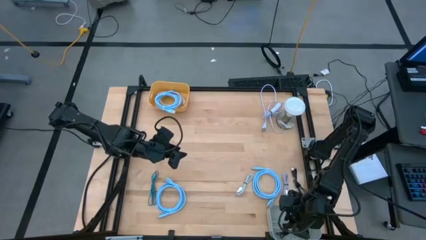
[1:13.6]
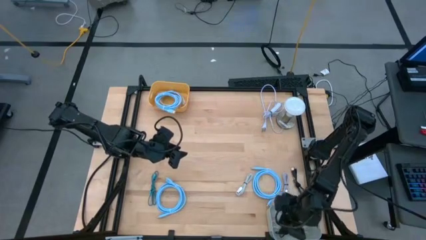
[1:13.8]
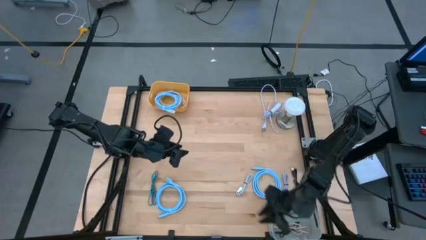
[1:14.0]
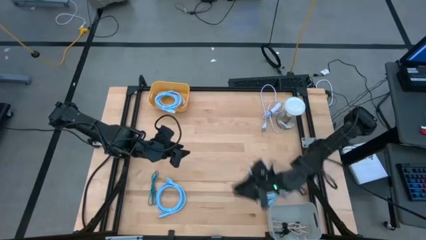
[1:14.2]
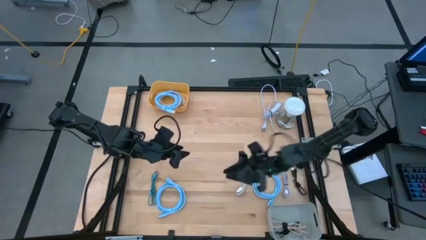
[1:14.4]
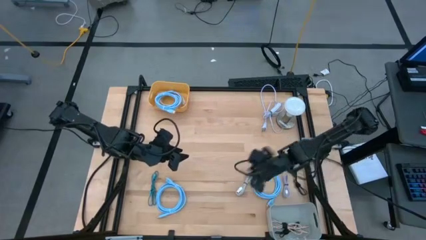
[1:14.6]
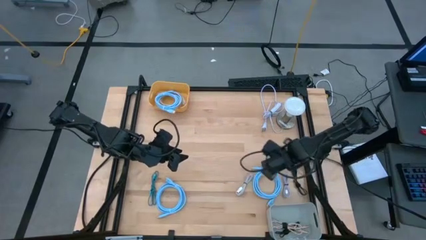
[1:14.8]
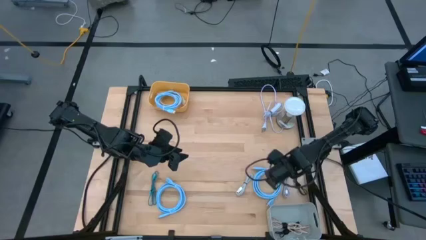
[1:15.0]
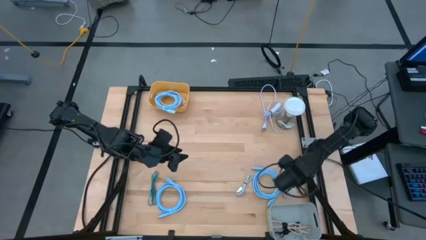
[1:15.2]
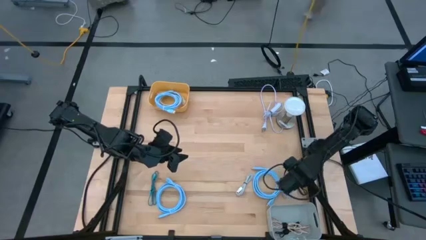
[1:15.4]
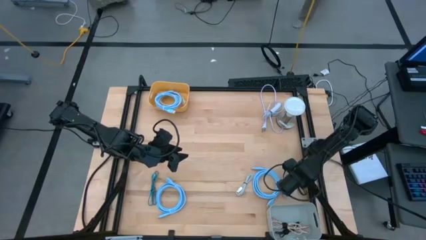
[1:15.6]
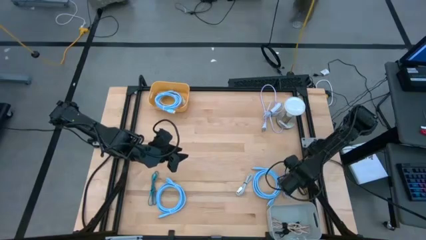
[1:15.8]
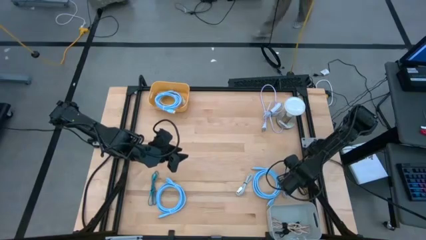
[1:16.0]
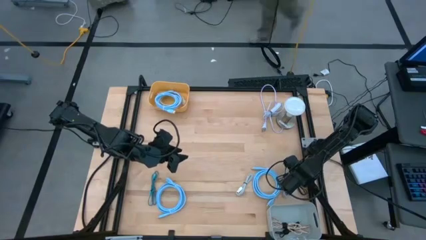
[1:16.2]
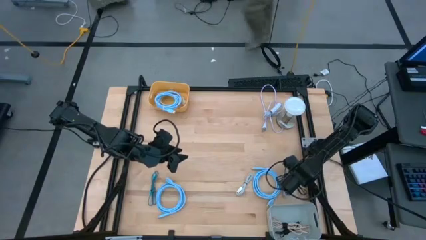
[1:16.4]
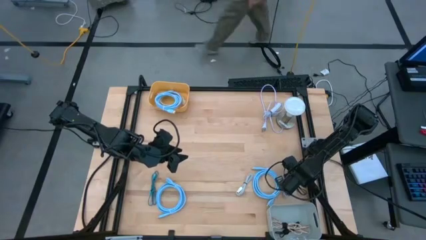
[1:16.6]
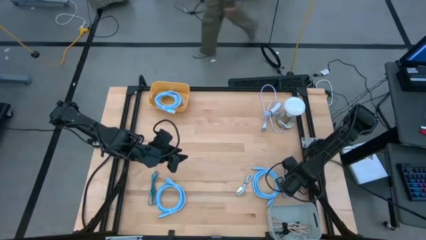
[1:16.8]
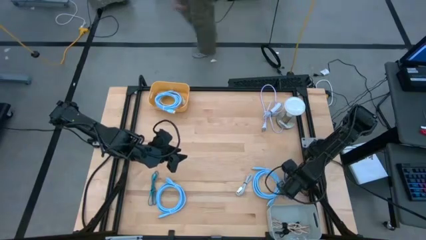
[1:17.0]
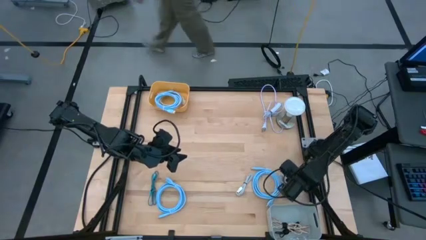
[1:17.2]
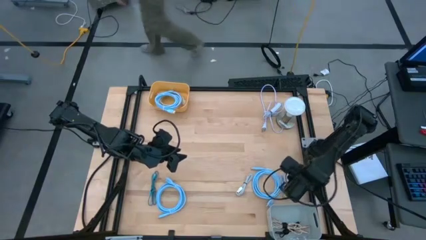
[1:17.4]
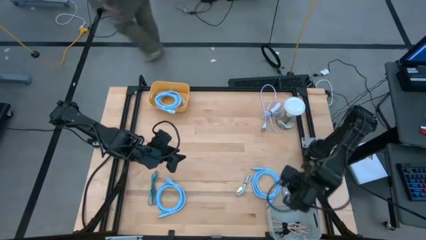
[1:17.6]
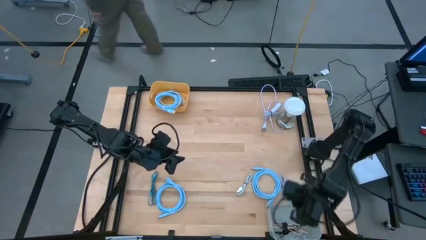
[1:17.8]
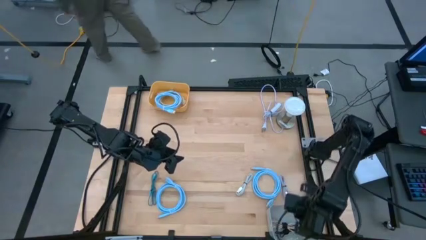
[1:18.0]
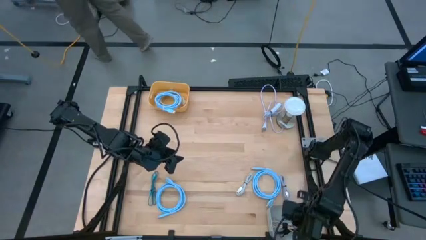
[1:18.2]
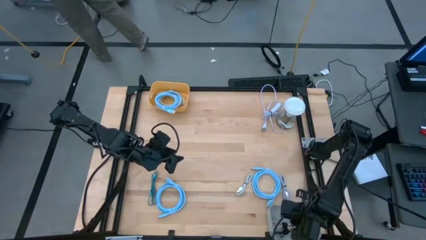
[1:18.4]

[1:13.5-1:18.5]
Task: Pick & Place USB Port
Put the black charger cable into the gray bin

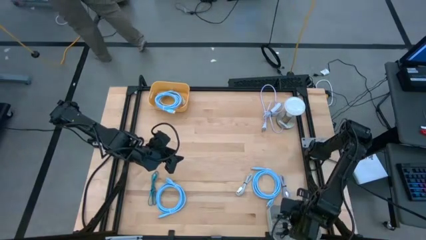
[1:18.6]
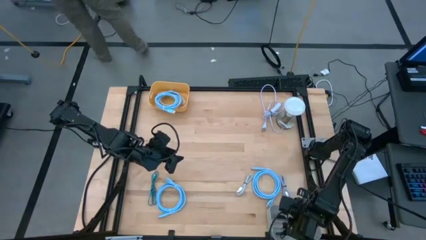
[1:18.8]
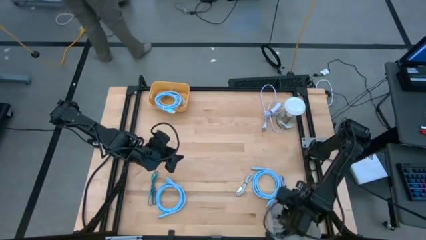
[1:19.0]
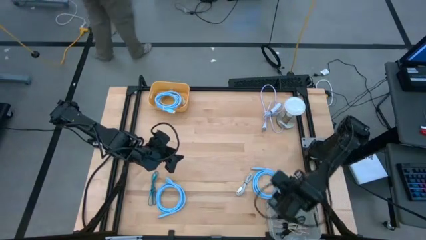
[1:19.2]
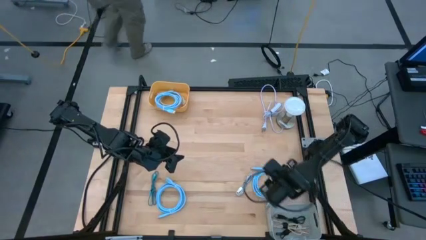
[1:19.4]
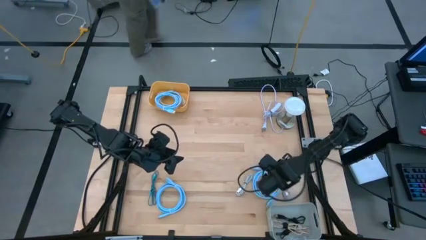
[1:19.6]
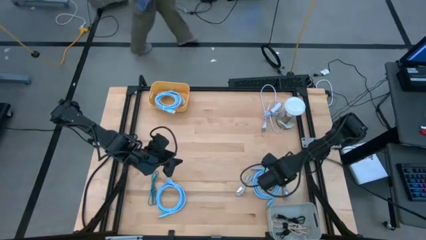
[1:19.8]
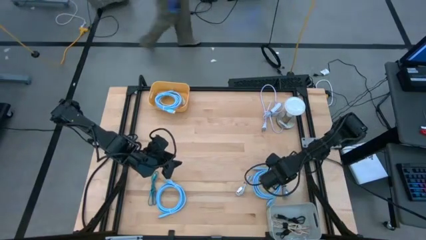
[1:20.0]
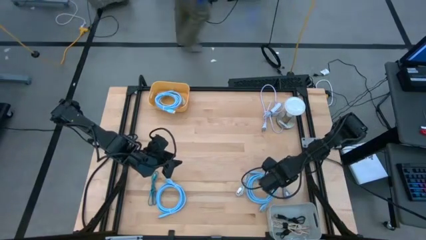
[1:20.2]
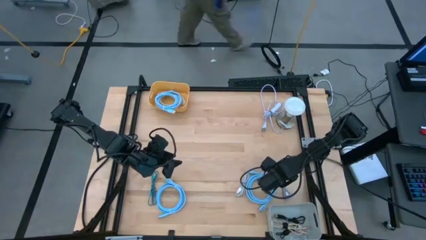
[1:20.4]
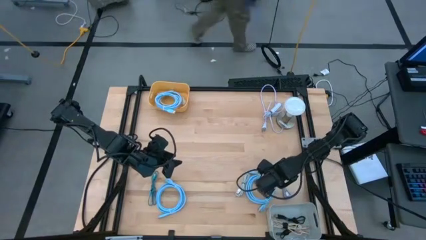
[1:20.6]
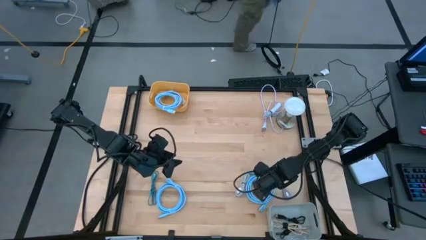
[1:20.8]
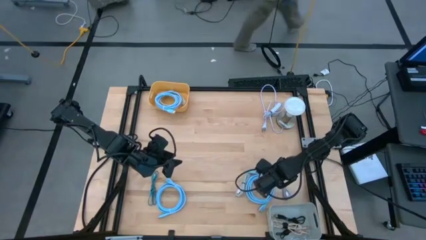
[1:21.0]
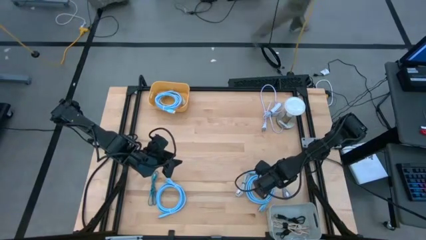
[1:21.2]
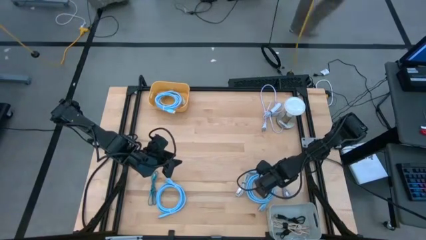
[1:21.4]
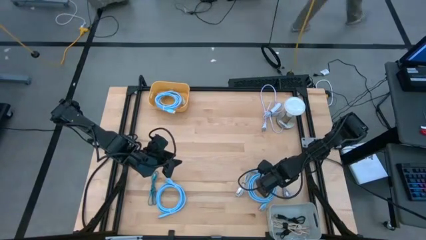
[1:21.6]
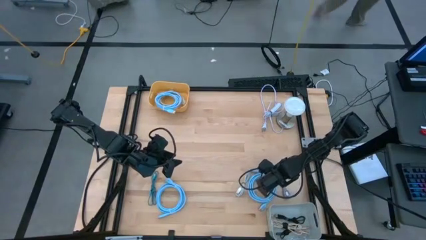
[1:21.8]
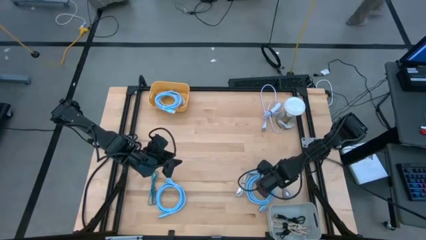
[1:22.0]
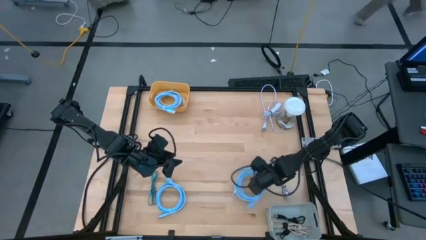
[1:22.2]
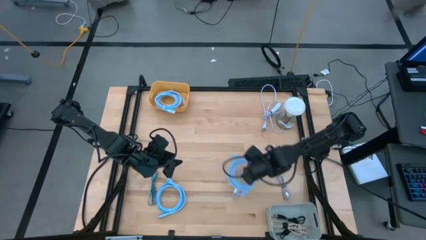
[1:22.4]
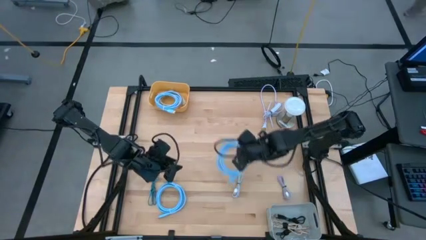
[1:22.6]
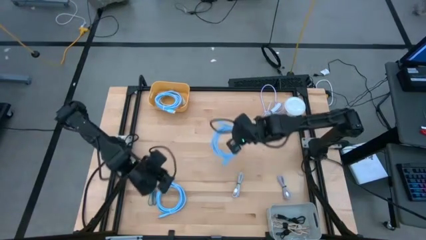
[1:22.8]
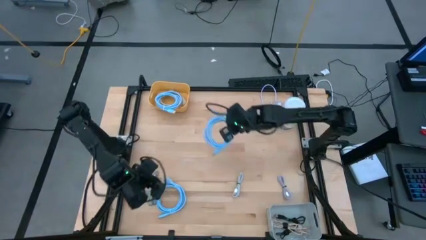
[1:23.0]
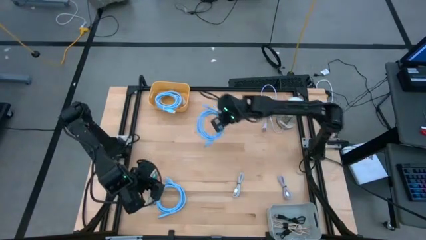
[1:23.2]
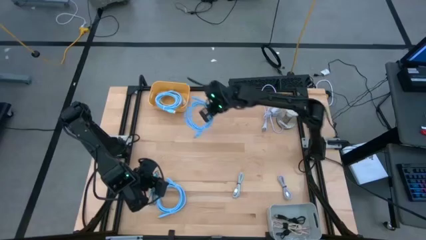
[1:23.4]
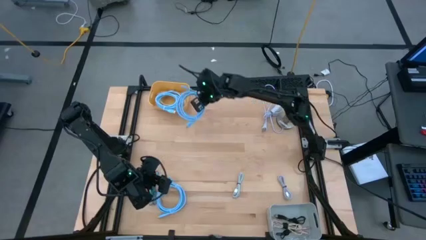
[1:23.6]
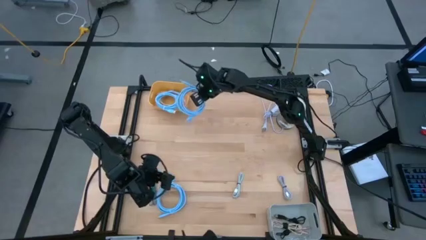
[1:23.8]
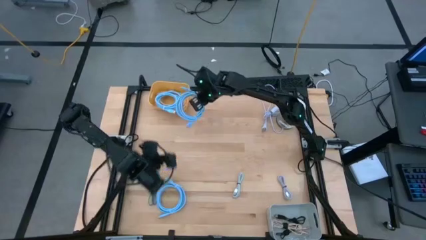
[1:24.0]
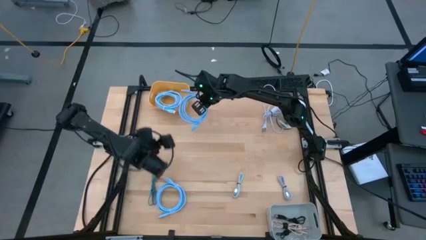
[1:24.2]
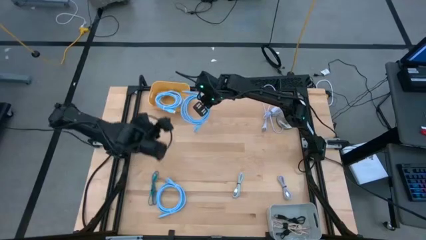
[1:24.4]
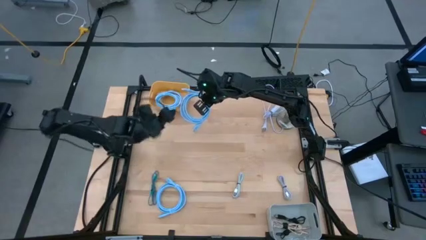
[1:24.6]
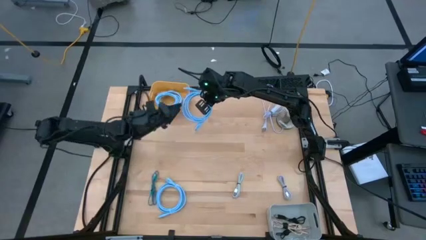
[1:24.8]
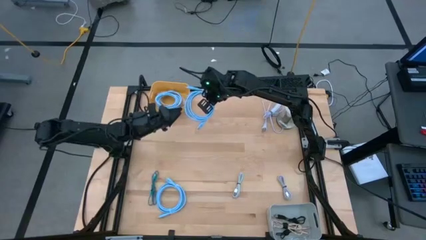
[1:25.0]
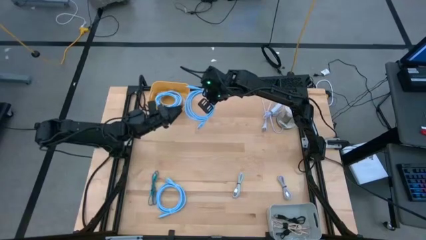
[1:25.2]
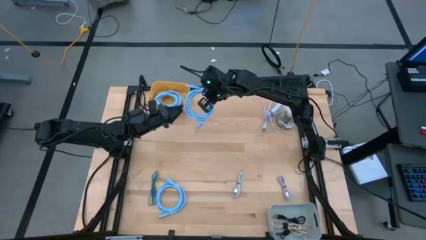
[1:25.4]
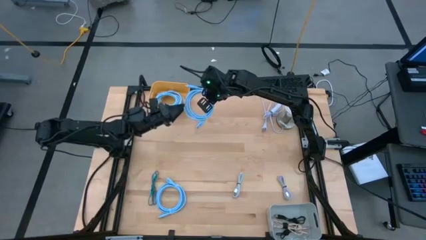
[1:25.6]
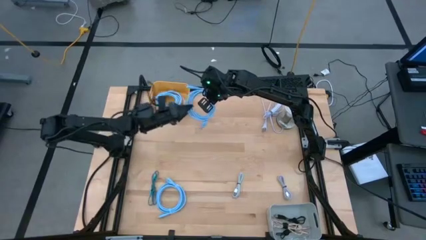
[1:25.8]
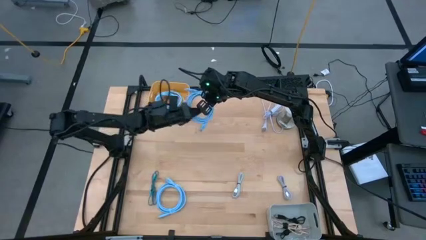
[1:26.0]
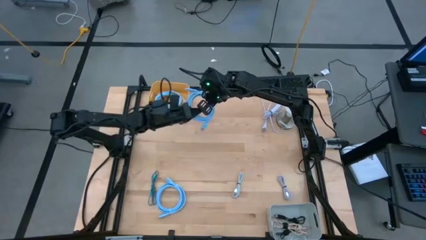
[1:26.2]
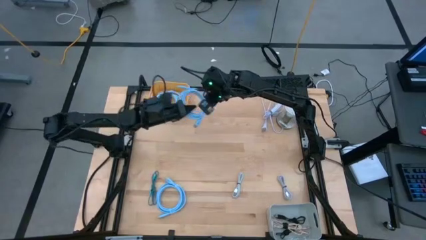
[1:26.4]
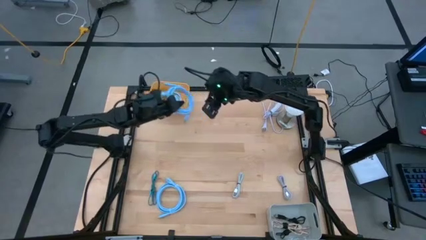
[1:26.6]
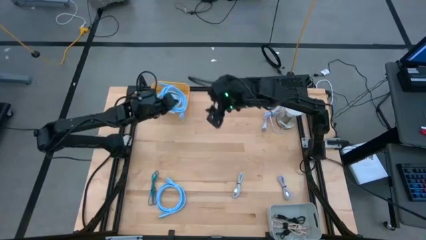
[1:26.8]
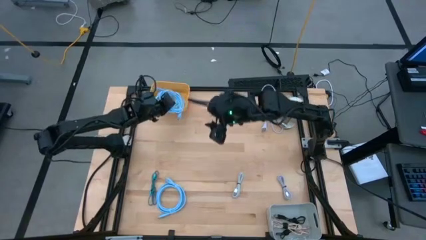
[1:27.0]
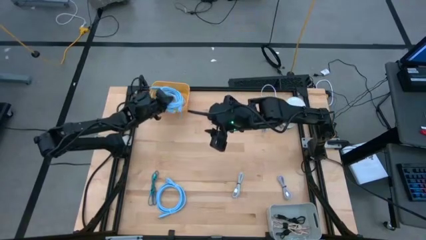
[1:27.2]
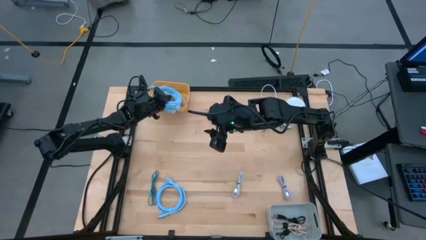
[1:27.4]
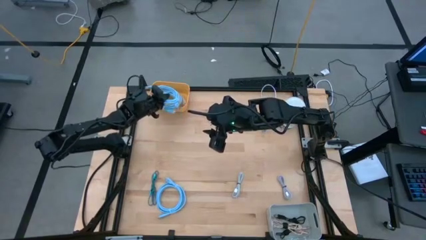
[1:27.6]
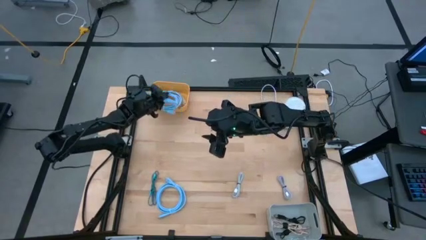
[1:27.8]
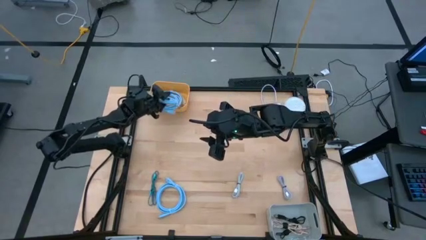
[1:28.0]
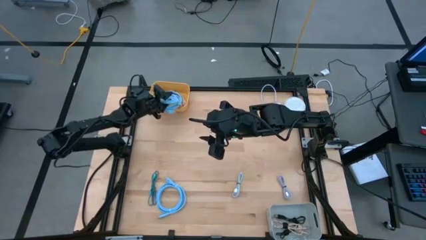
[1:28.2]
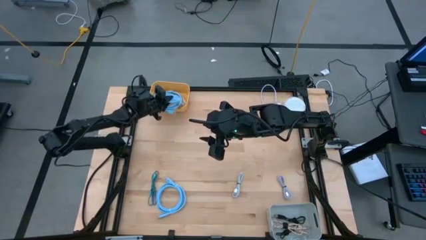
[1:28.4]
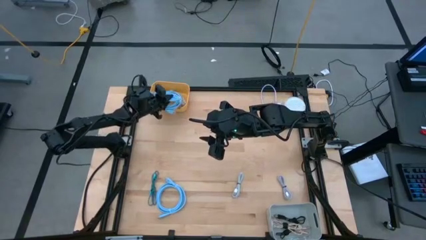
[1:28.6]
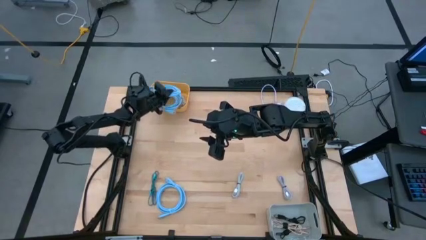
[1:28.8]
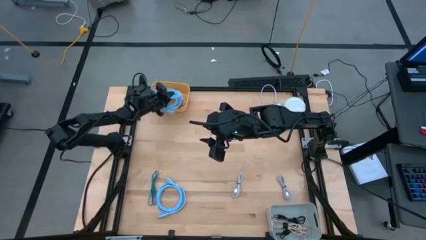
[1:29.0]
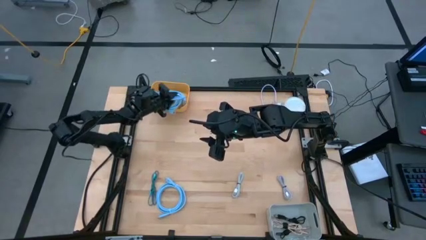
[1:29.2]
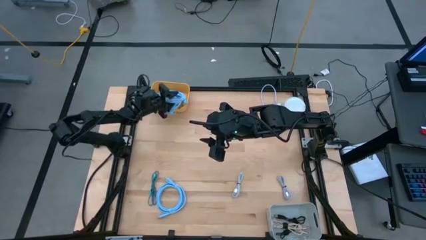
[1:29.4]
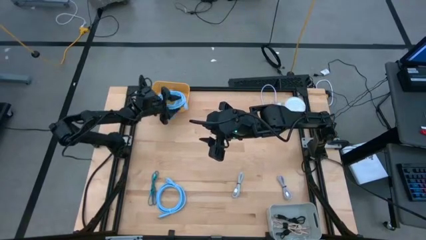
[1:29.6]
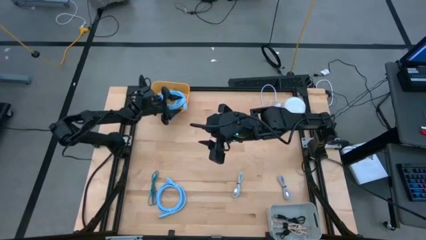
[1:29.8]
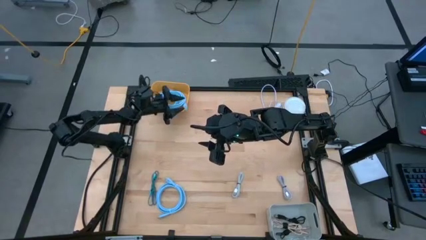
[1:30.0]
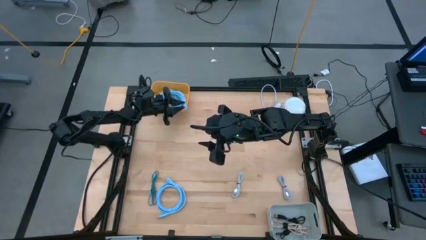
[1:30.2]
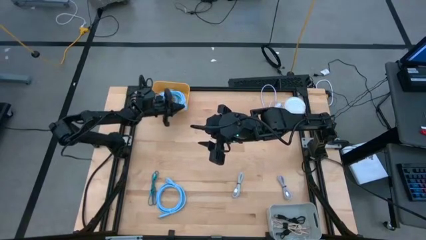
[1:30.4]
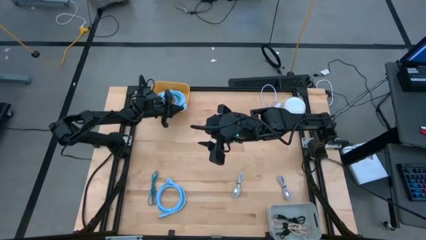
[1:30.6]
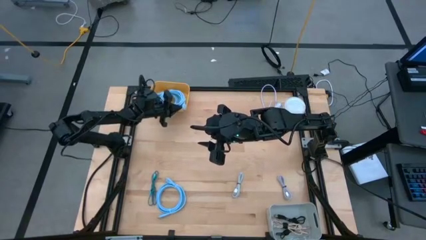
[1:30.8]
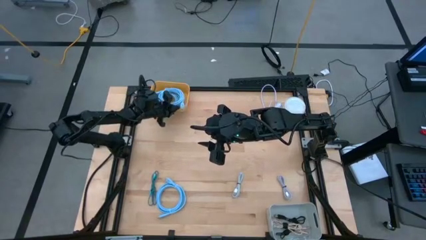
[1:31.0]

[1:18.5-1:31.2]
Put the right blue hdmi cable into the yellow bin
